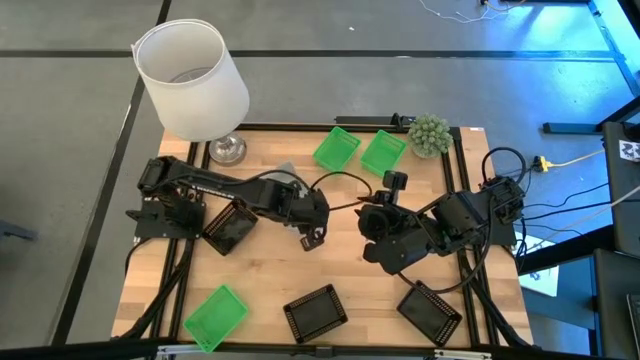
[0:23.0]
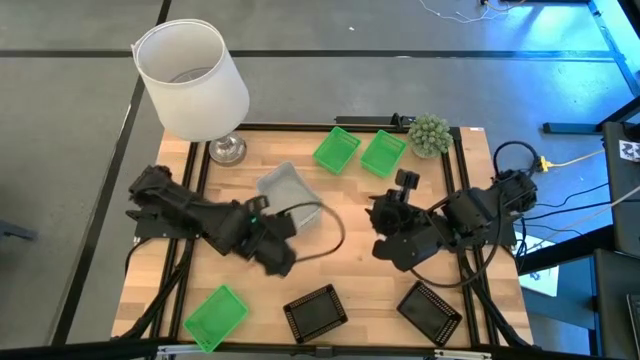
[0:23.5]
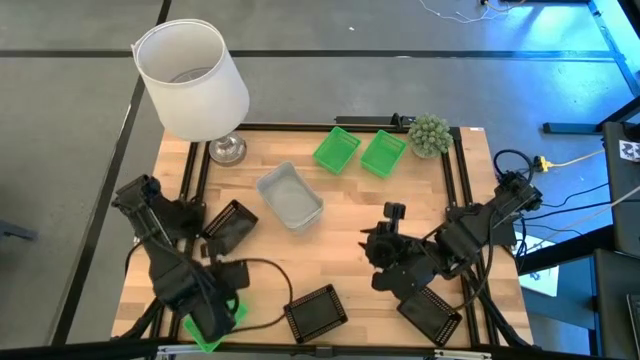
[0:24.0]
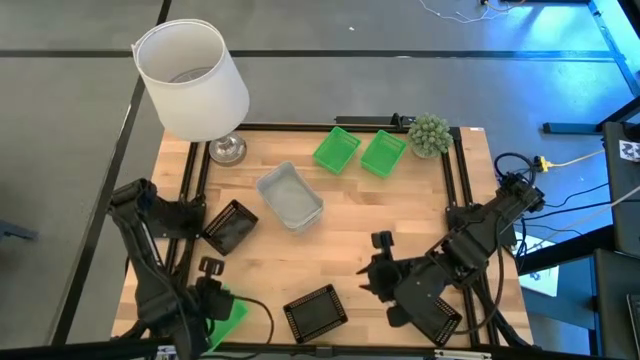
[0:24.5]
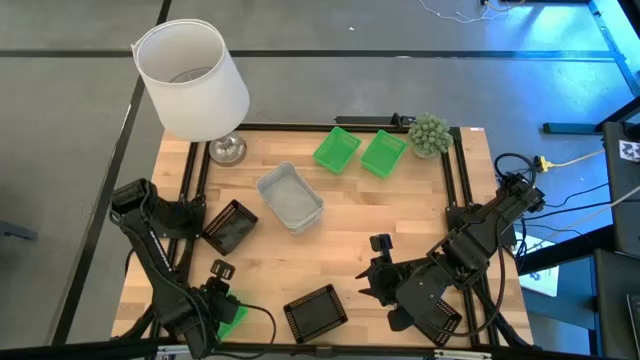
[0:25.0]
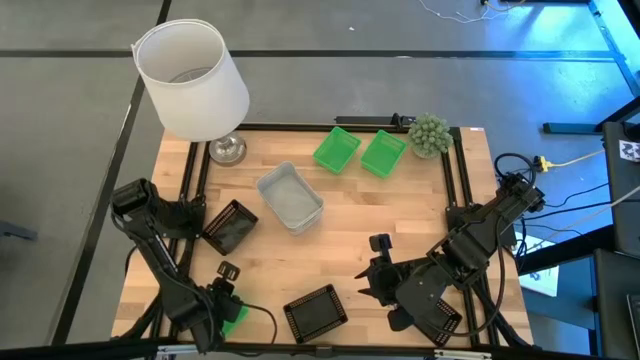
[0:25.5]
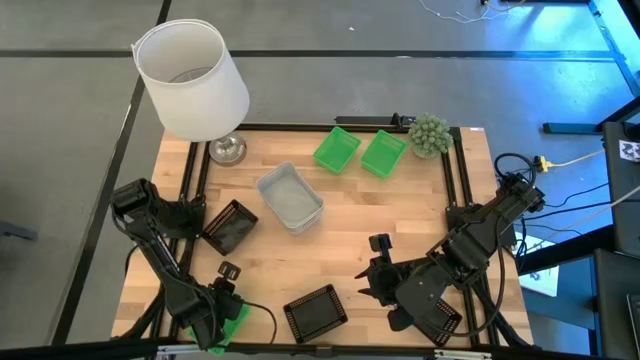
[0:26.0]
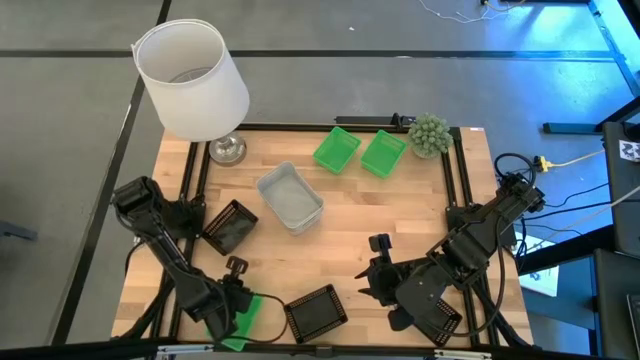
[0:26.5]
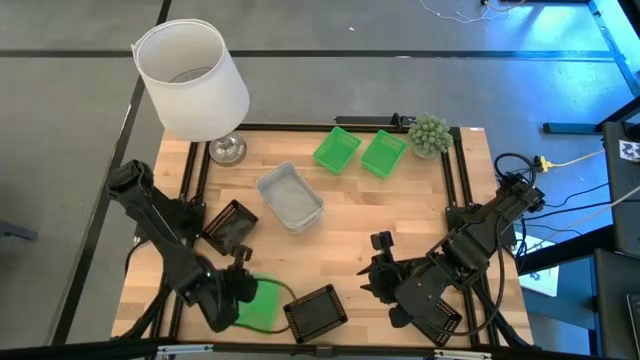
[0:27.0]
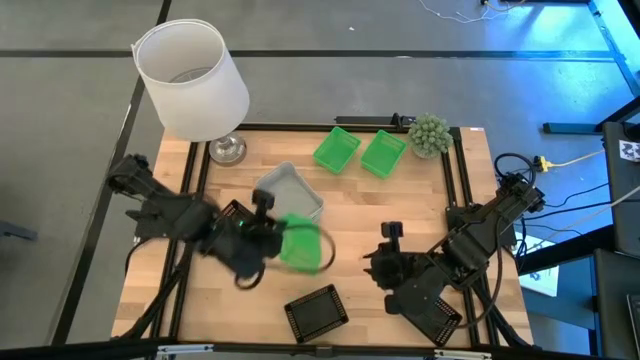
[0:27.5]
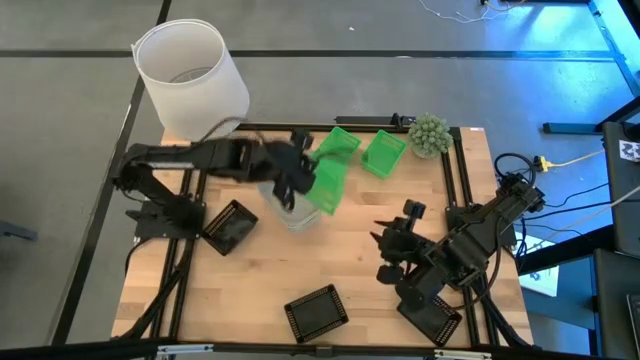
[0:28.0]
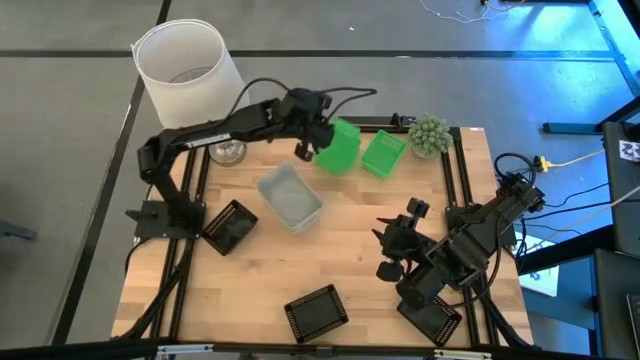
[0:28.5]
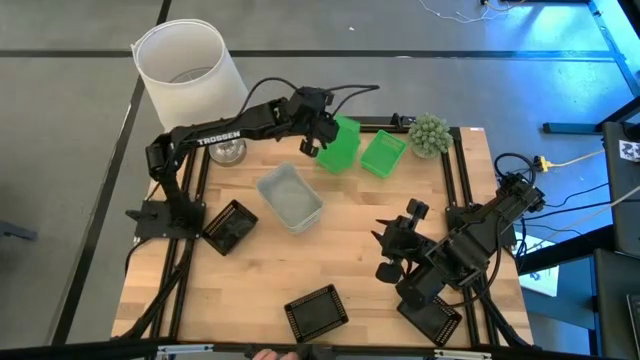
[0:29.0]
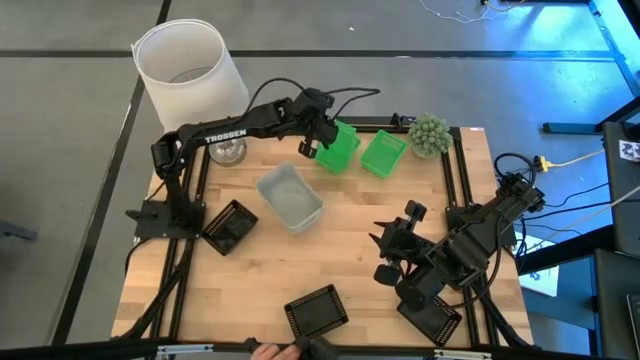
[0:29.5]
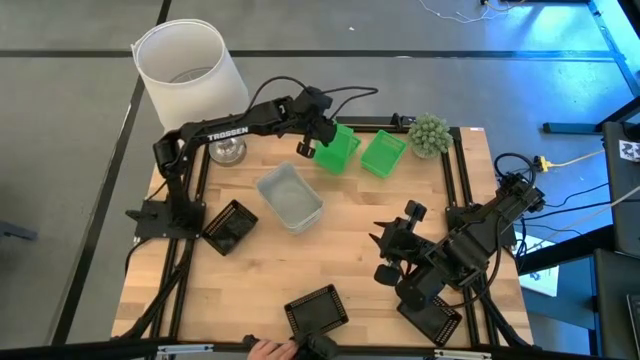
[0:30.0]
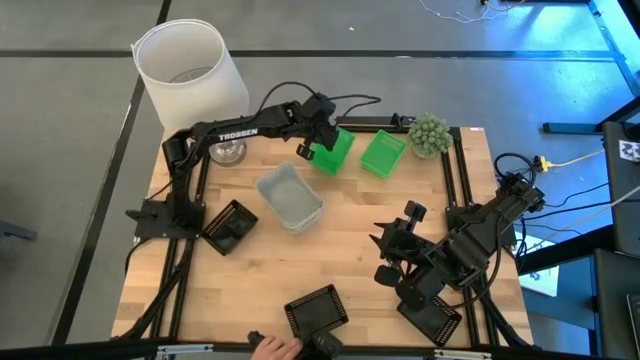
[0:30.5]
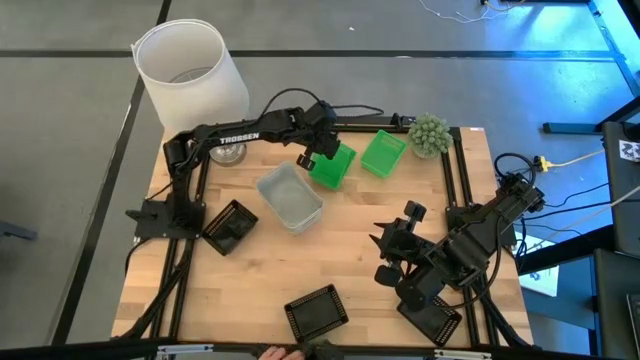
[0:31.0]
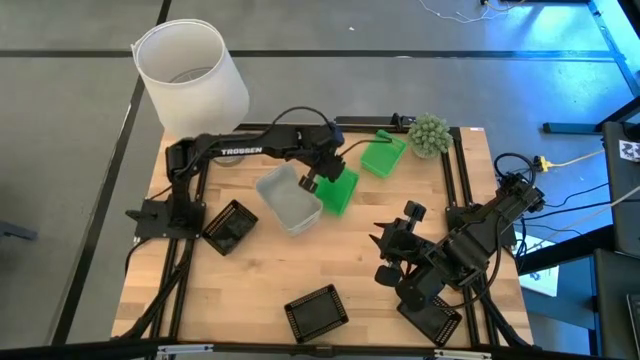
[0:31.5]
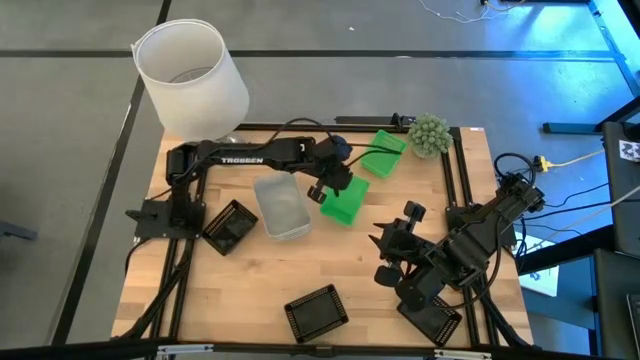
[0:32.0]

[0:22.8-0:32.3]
Stack the bottom green bin into the top left green bin

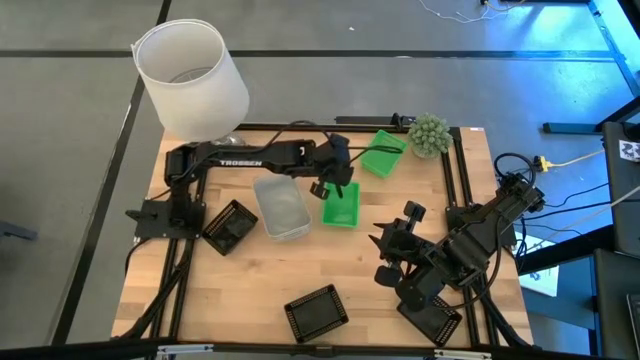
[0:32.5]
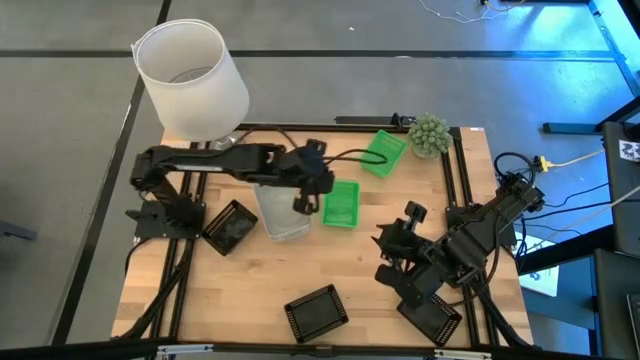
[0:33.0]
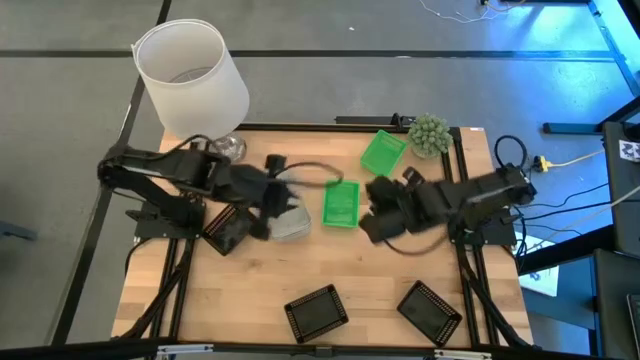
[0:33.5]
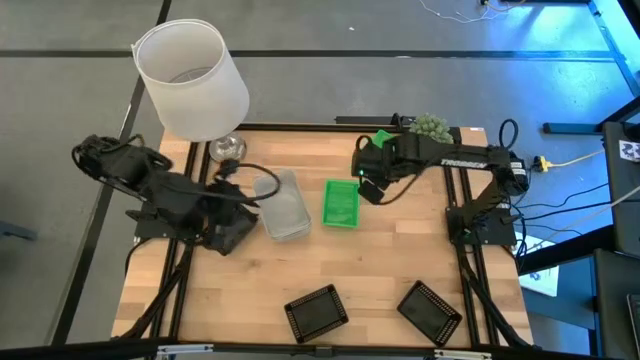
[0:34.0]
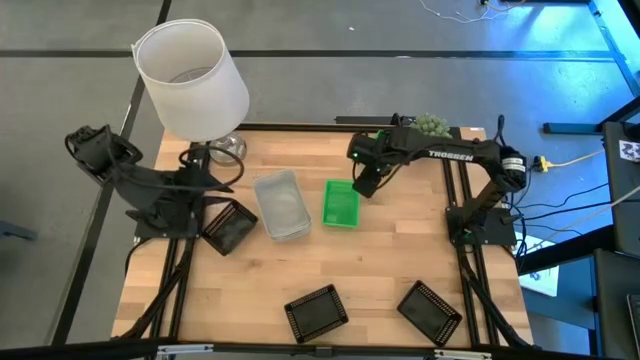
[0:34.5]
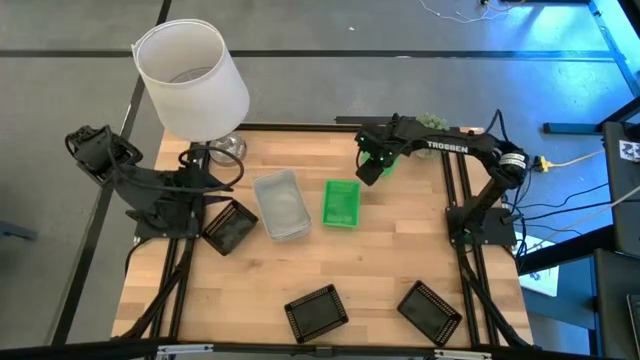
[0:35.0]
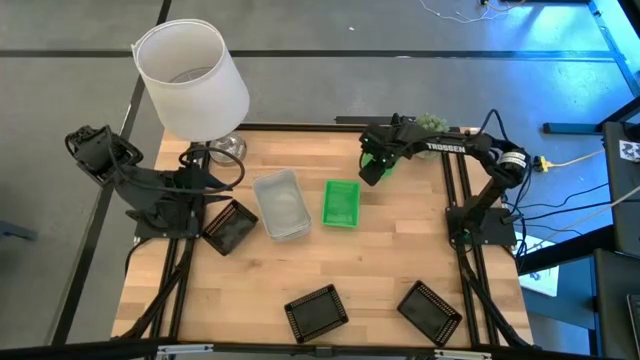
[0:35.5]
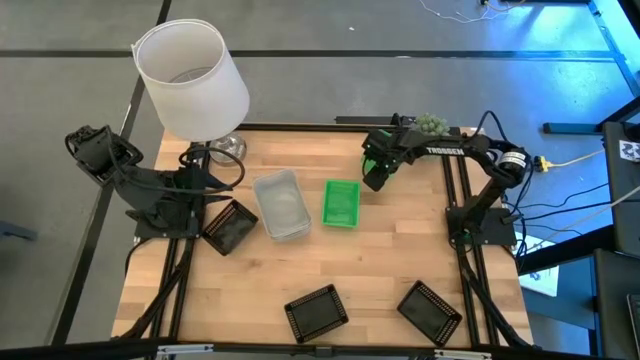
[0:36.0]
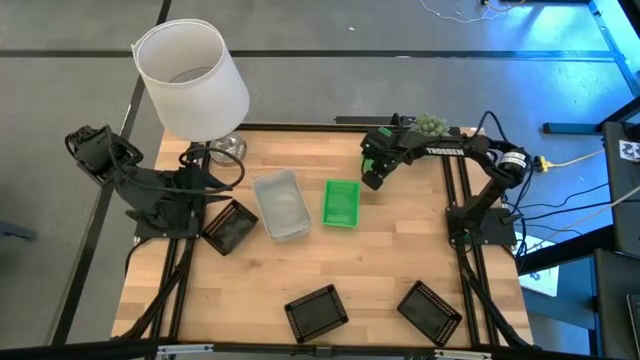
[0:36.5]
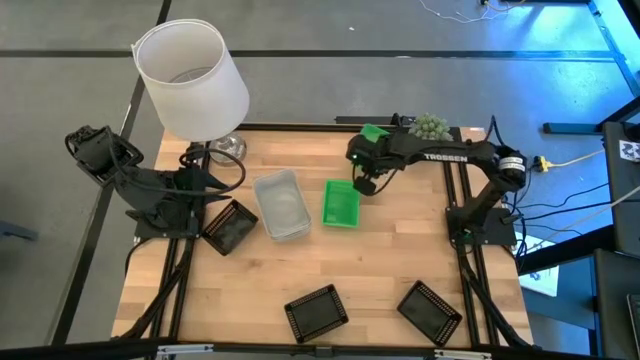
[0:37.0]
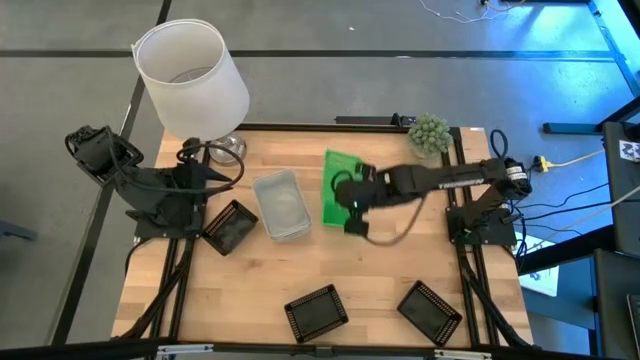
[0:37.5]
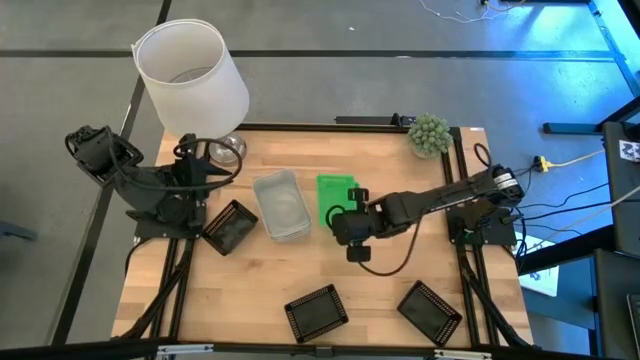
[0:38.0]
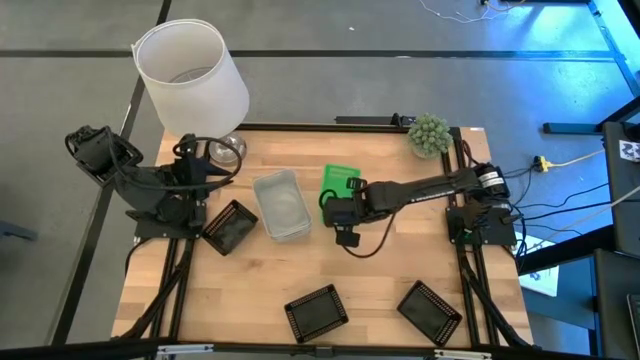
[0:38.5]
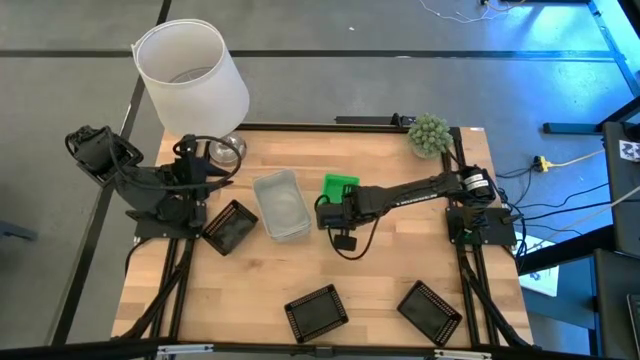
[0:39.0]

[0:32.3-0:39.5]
Stack the top green bin into the bottom green bin

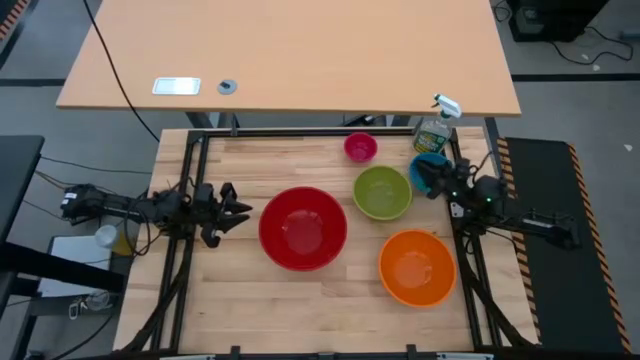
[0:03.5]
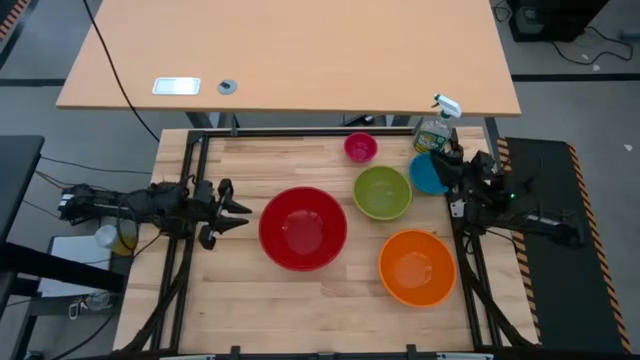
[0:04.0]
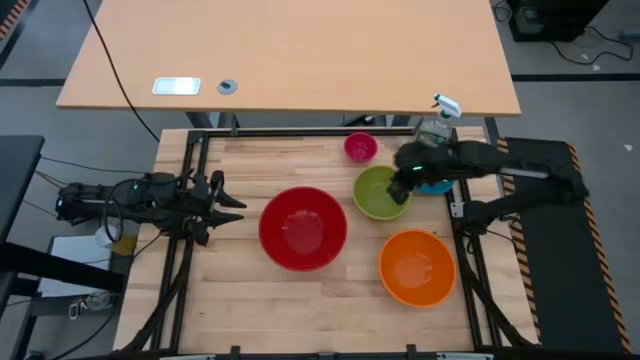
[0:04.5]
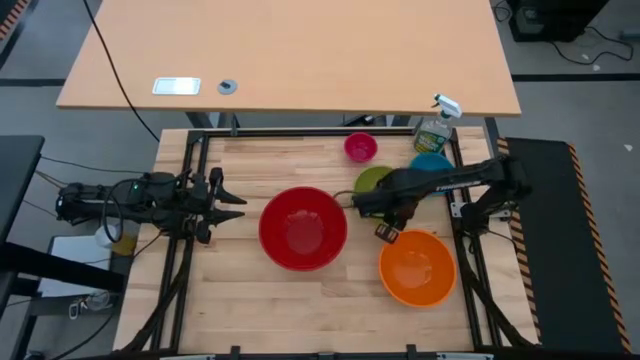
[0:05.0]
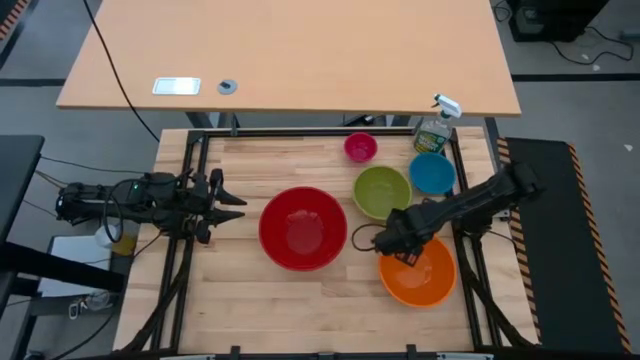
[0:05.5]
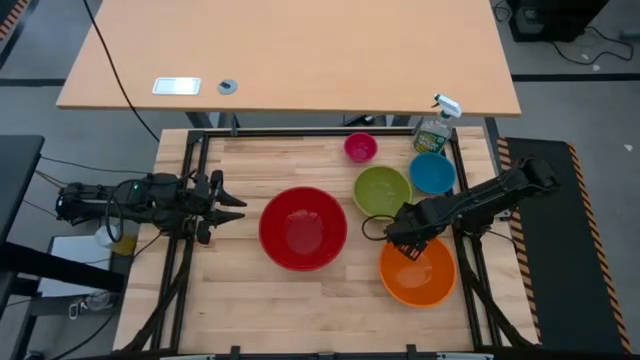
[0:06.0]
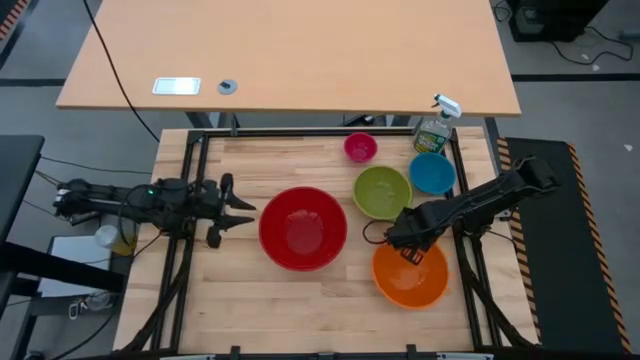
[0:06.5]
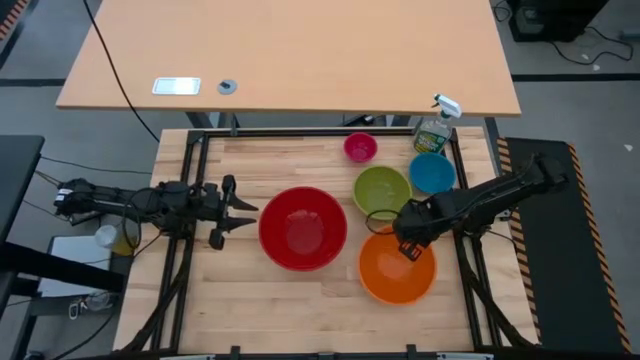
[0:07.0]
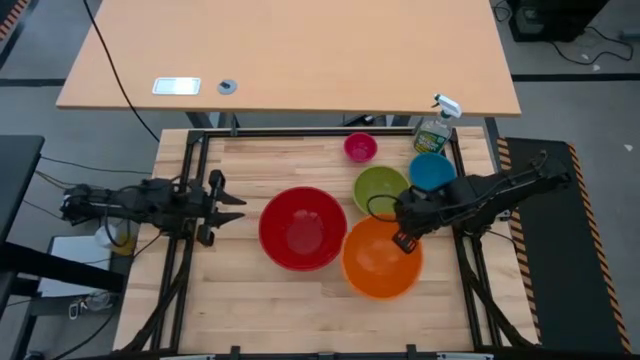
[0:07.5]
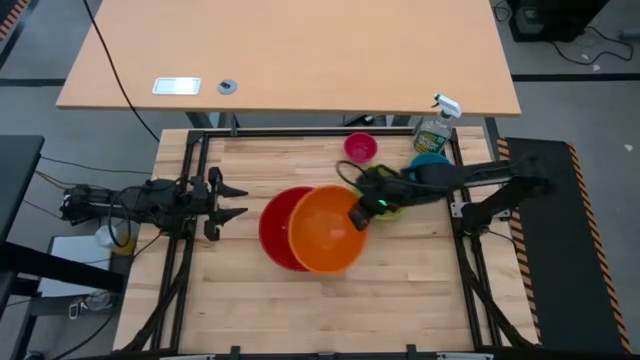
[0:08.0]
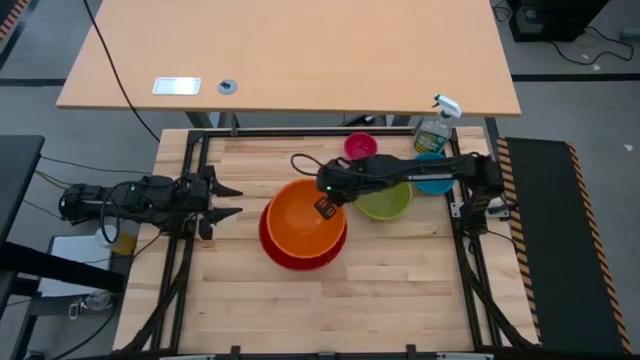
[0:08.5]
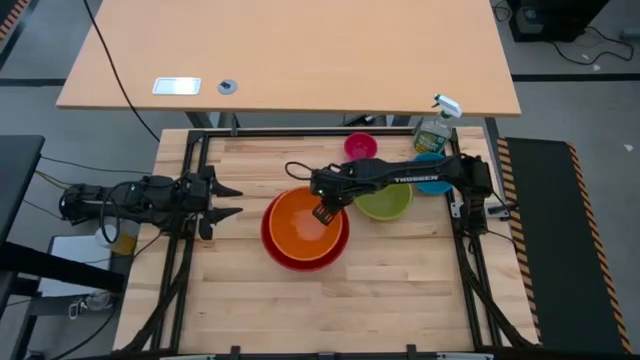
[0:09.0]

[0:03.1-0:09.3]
Stack the orange bowl on top of the red bowl
